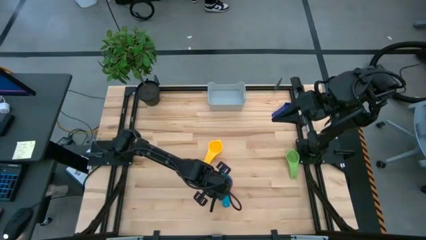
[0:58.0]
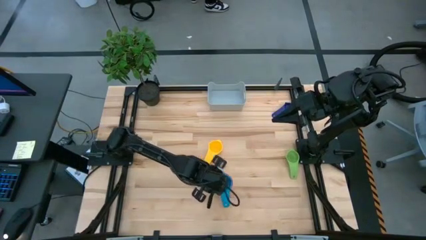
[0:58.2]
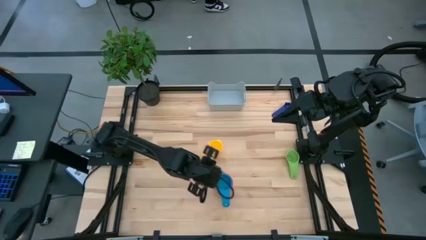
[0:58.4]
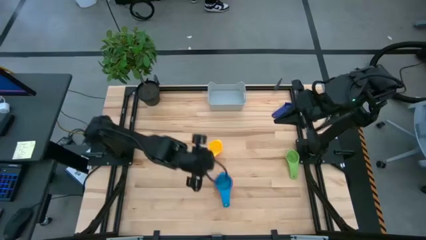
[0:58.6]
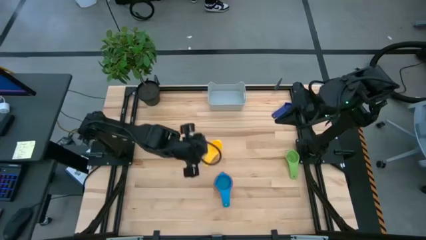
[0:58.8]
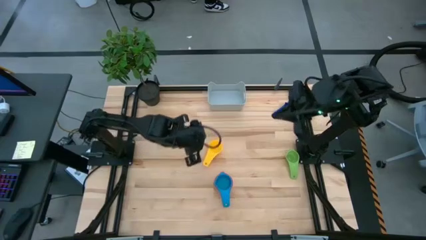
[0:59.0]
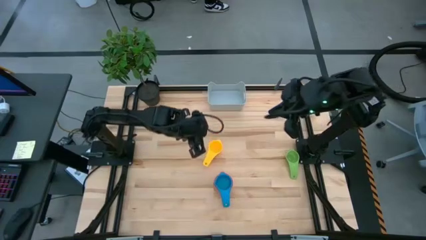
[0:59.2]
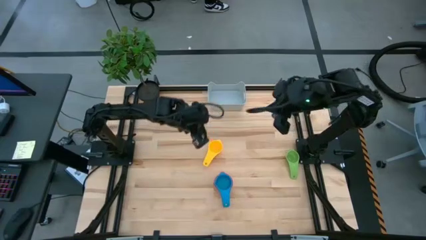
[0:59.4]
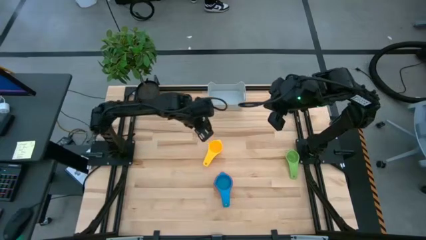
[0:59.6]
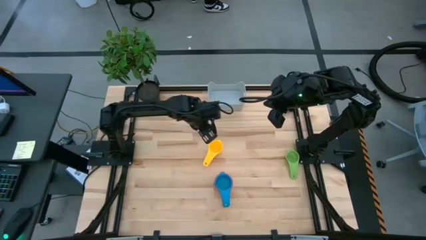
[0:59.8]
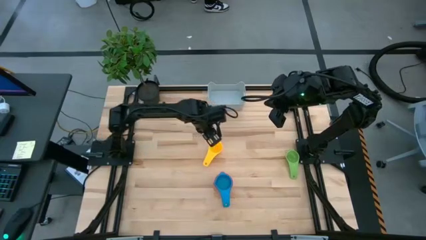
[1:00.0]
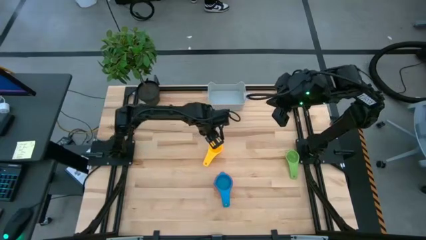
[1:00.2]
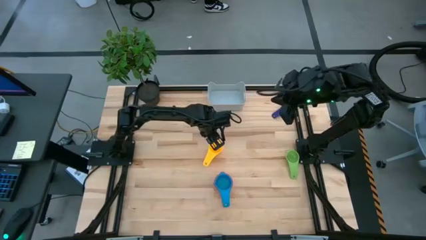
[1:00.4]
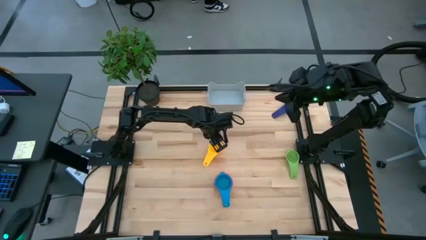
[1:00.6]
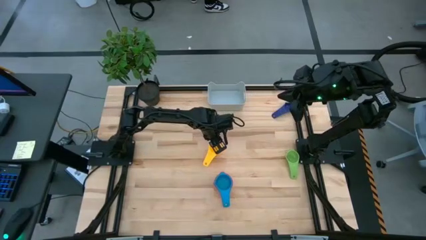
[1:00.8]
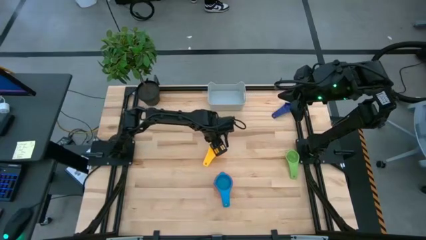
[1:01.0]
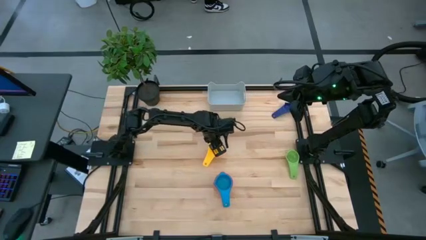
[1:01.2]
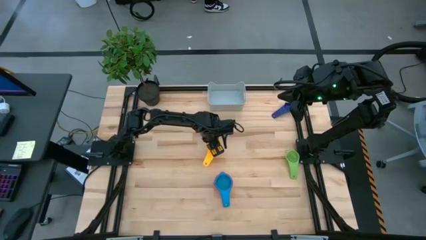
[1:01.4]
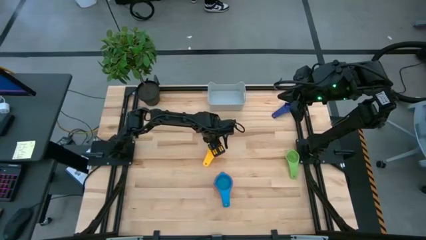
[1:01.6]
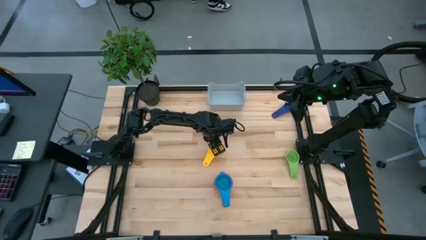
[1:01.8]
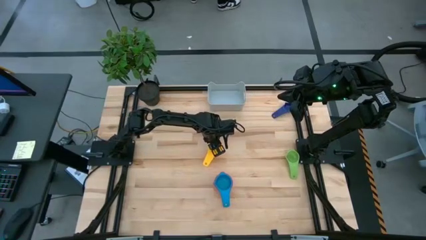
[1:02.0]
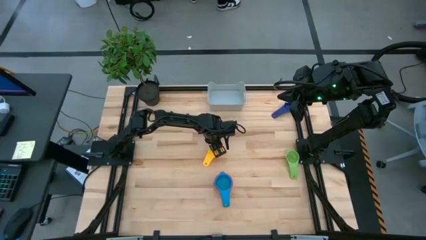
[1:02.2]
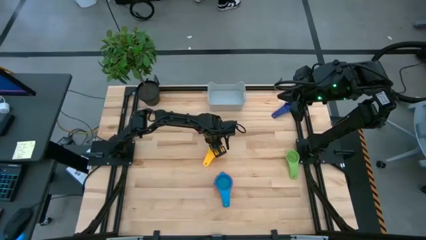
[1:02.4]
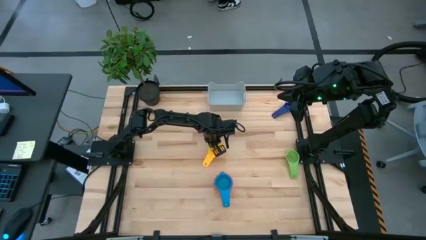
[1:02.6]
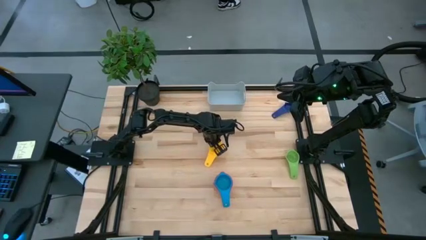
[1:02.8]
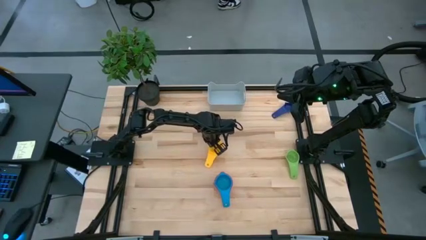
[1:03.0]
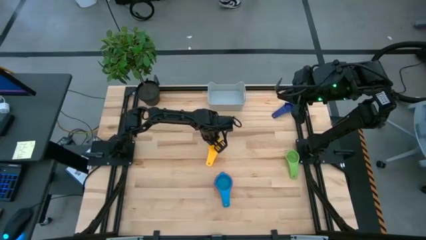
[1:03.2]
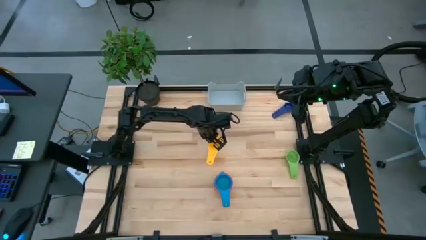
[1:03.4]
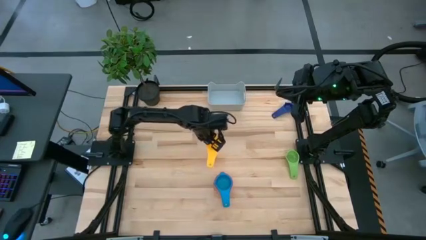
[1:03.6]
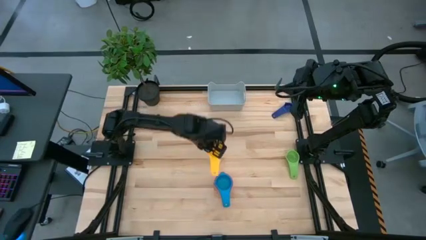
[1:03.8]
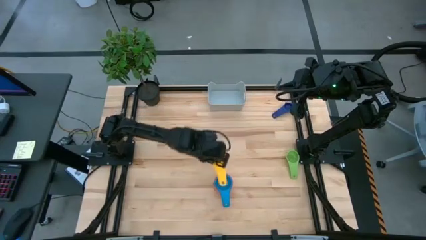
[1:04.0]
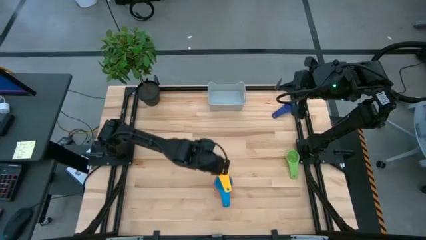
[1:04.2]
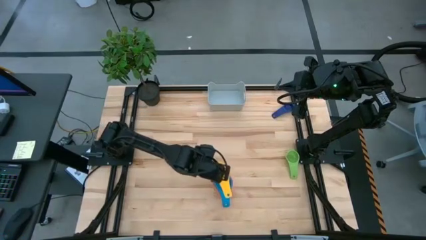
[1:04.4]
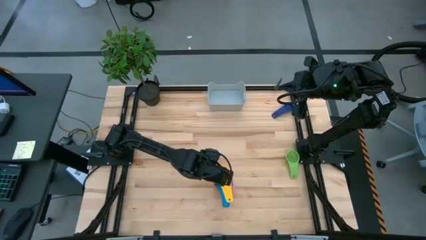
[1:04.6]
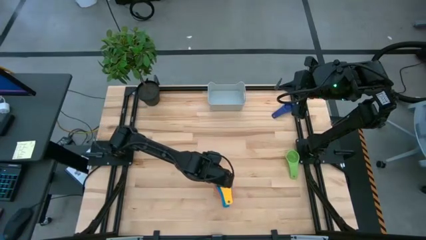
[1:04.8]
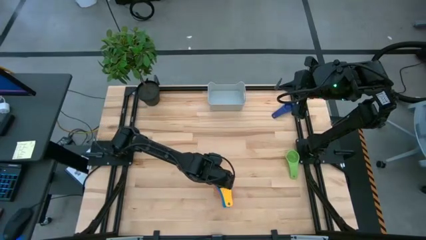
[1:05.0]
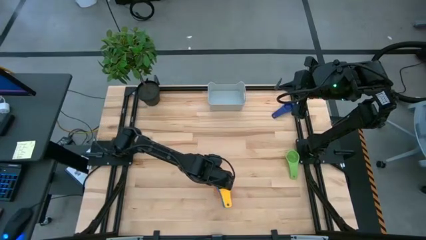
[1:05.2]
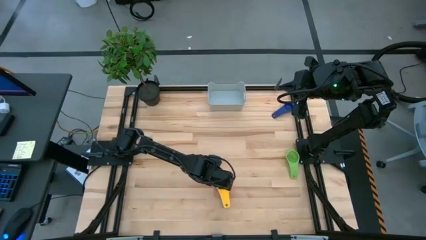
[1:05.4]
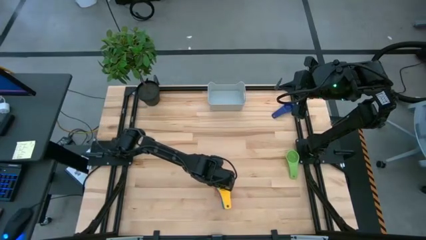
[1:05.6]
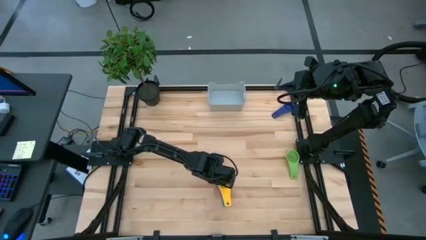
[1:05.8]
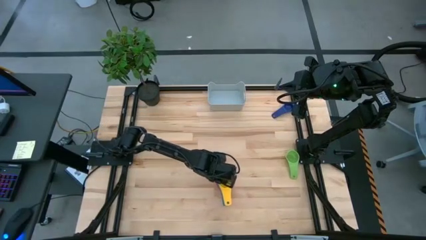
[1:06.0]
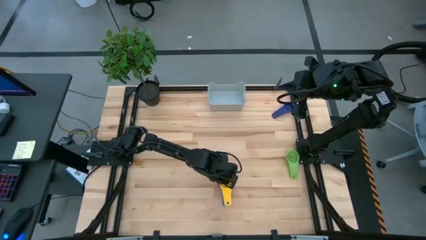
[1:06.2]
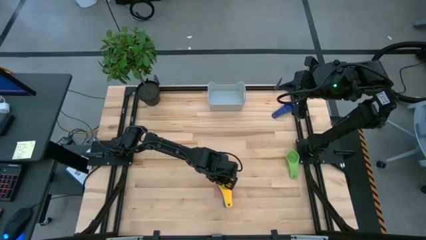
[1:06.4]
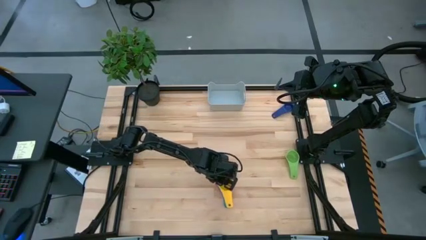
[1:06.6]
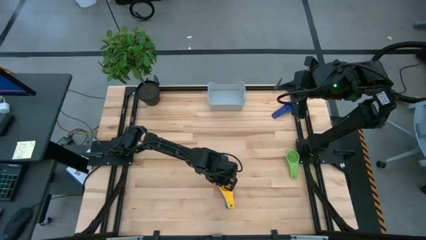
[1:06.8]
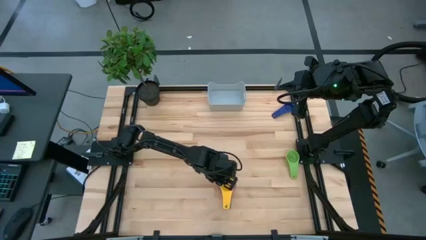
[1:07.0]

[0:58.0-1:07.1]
Task: Nest measuring cups in basket
Stack the yellow measuring cup on top of the light blue measuring cup

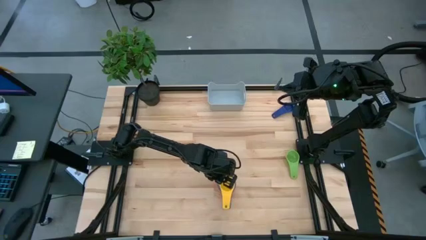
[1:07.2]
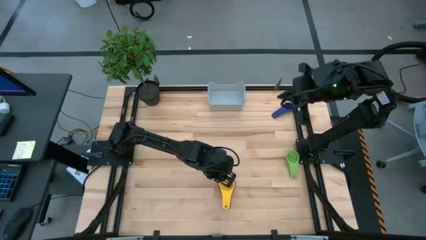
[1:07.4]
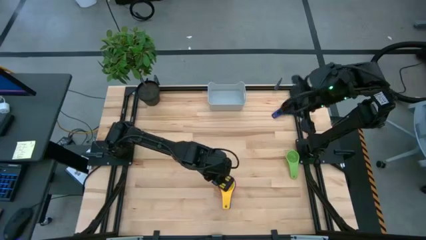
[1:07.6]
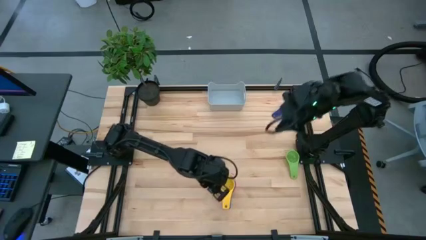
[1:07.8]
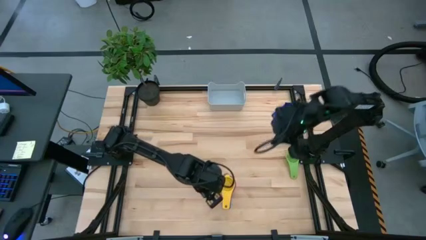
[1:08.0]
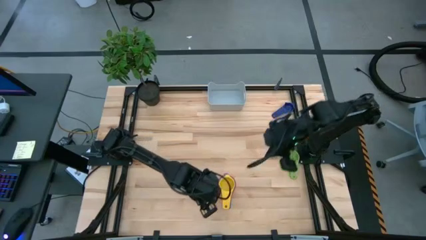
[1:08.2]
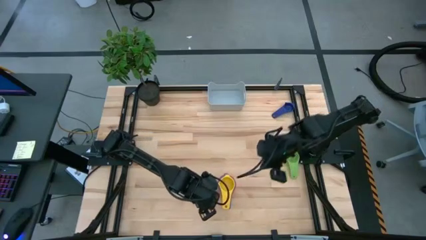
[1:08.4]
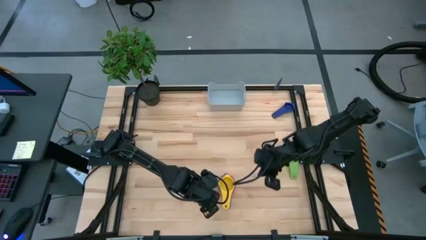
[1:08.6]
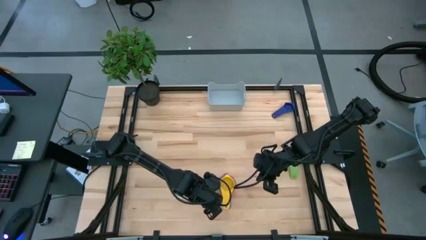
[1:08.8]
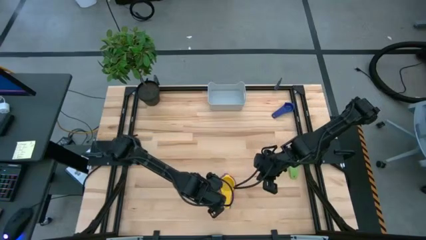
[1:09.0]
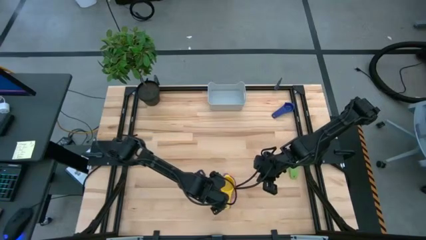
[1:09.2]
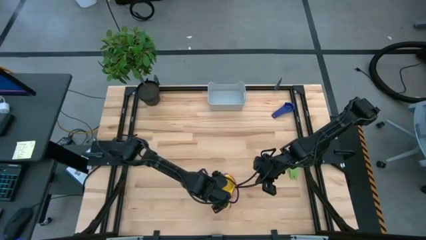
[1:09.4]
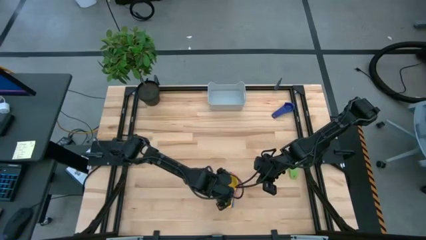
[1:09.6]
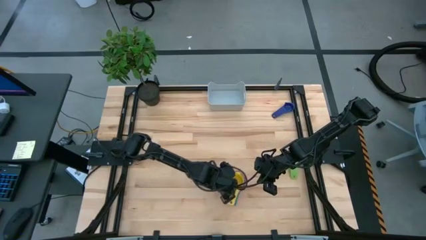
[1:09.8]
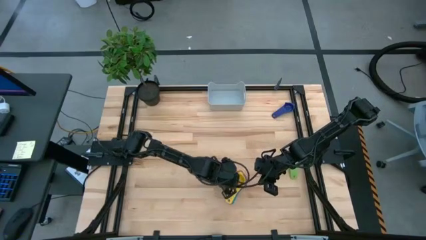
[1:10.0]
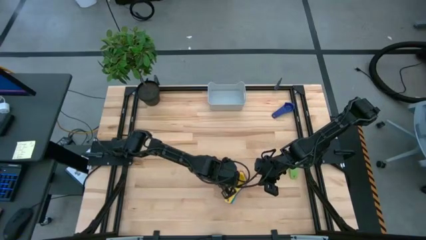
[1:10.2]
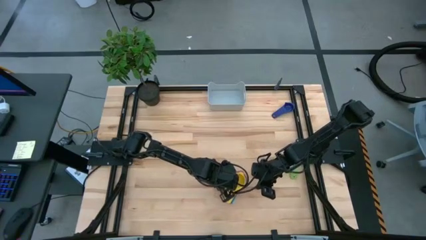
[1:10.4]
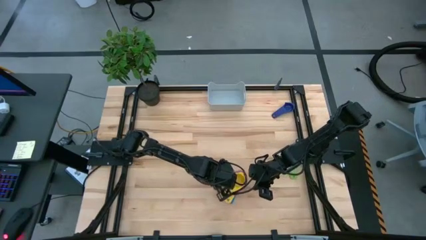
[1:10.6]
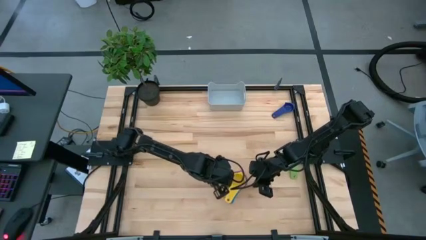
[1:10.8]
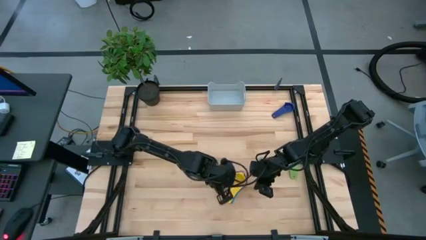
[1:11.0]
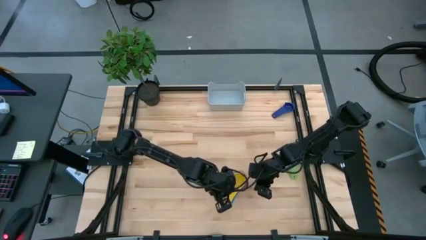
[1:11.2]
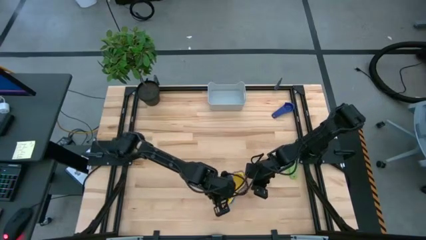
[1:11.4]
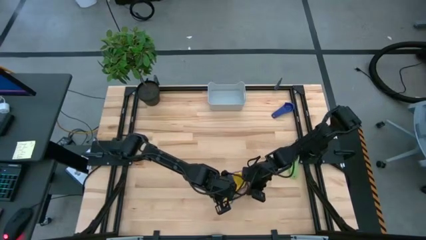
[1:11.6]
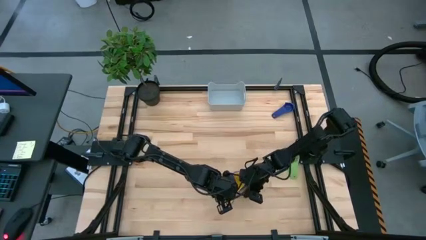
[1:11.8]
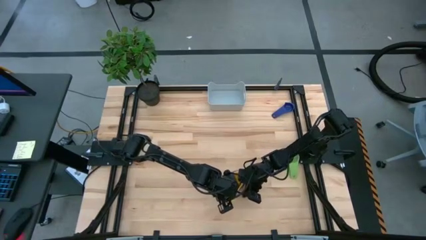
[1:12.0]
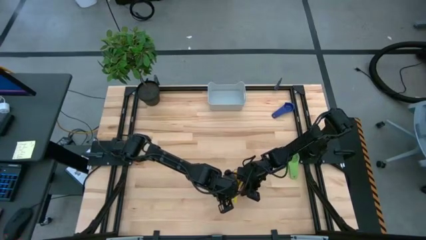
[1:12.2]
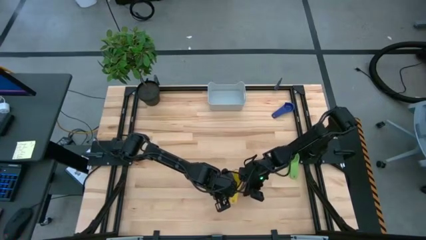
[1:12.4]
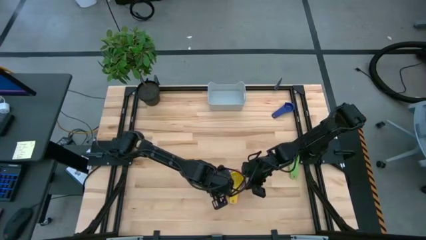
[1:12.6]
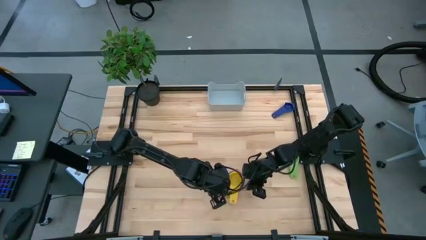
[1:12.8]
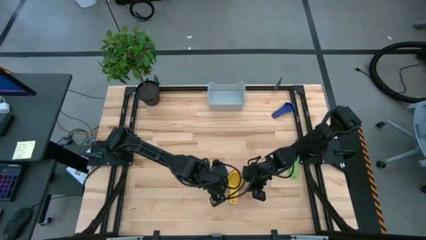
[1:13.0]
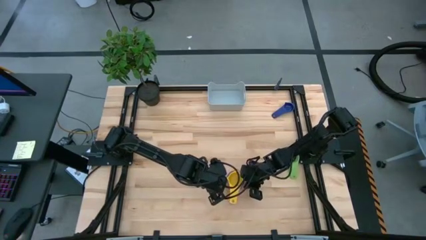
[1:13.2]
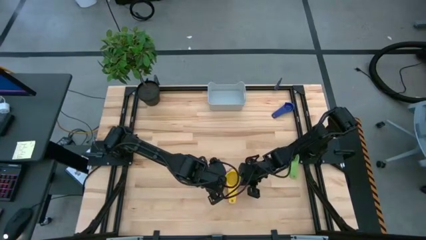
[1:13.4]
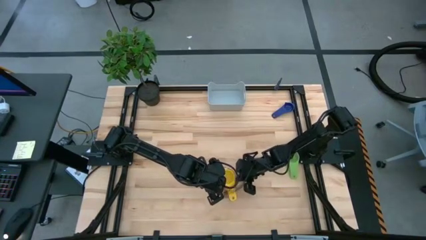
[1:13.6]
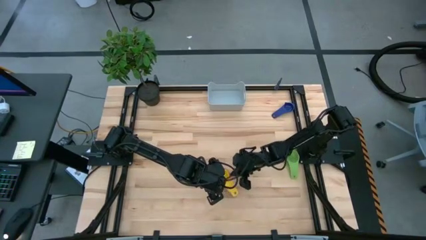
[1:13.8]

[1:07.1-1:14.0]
Adjust the stacked measuring cups on the table
